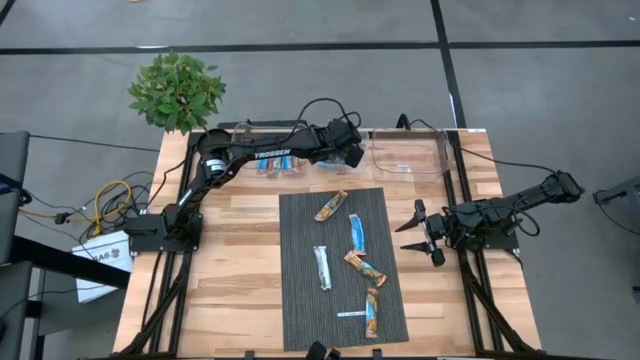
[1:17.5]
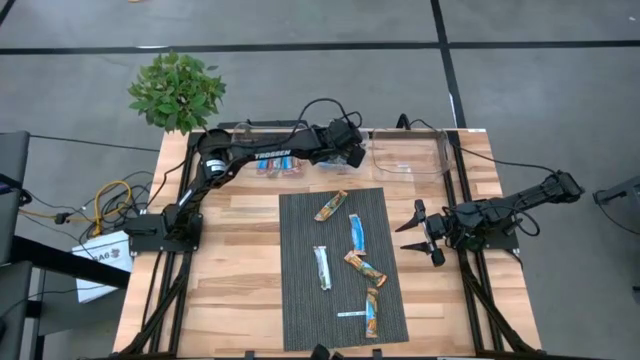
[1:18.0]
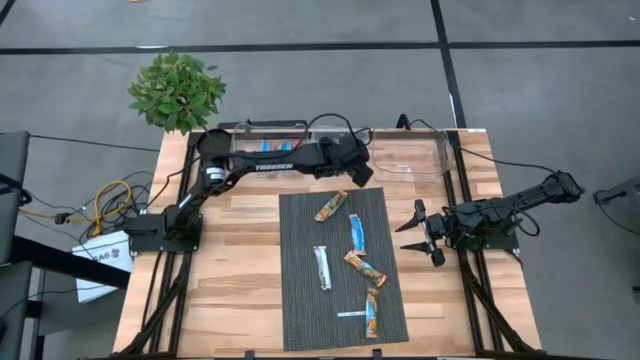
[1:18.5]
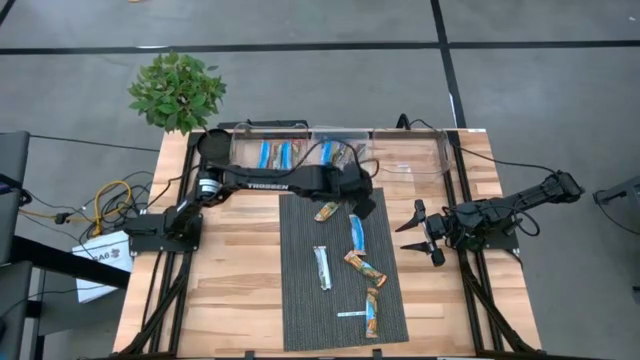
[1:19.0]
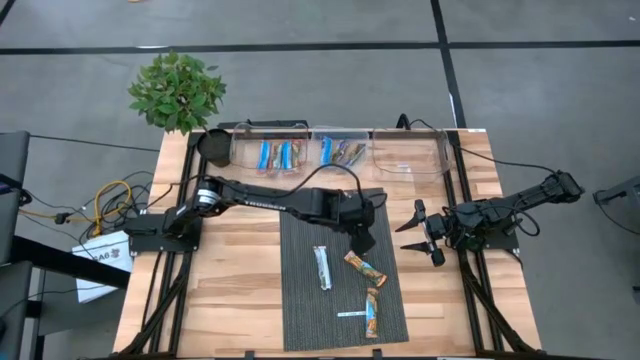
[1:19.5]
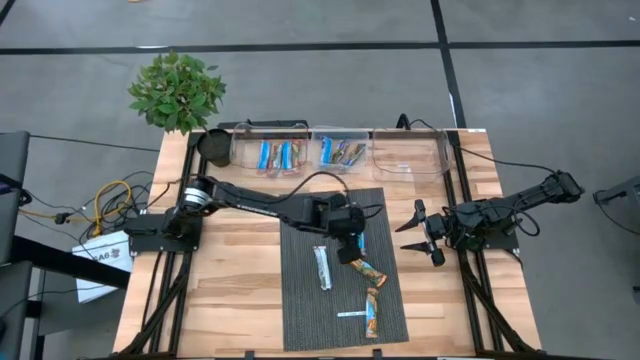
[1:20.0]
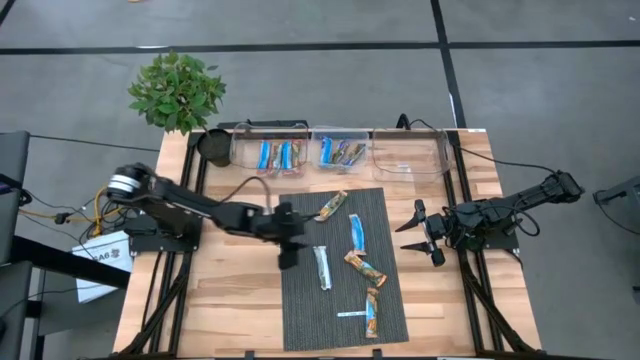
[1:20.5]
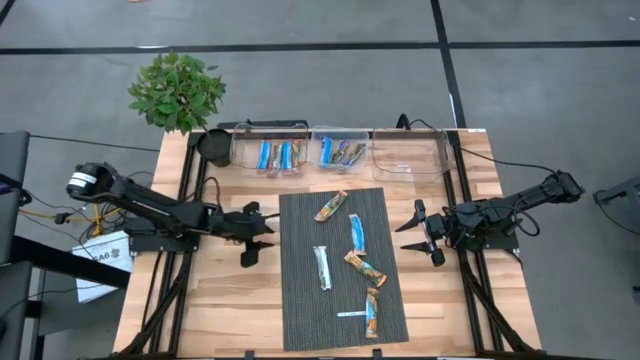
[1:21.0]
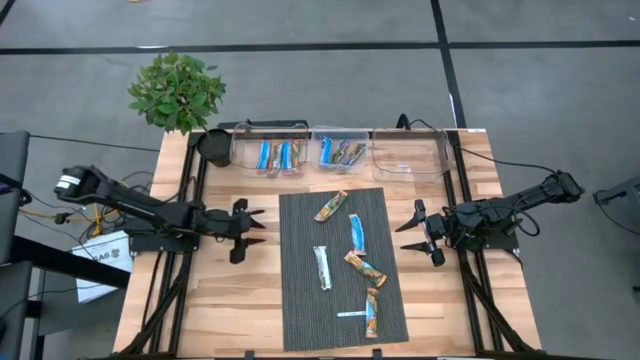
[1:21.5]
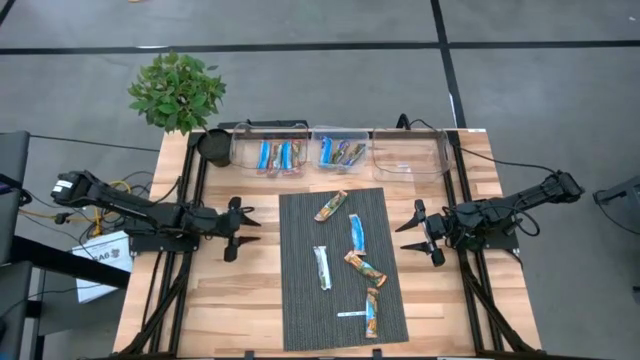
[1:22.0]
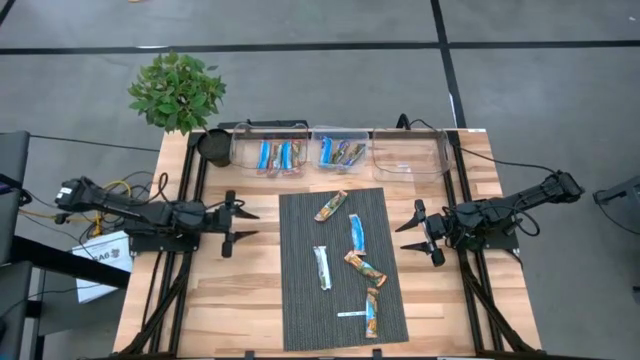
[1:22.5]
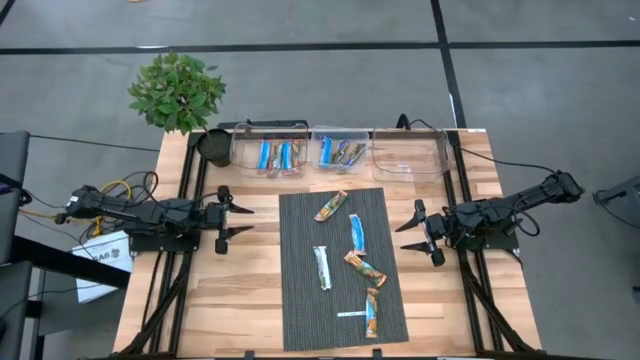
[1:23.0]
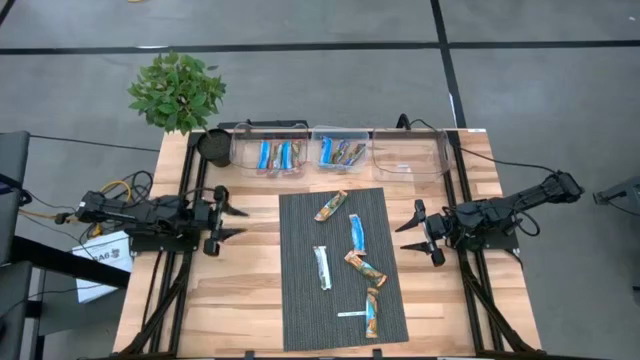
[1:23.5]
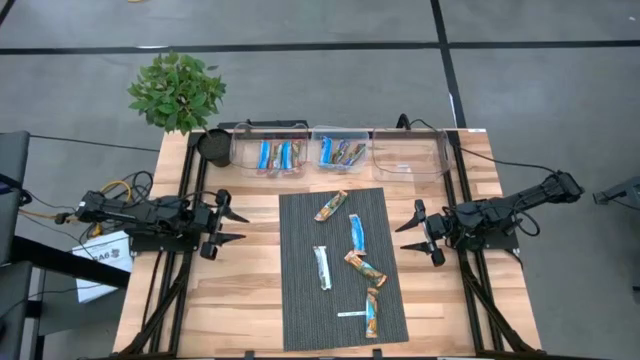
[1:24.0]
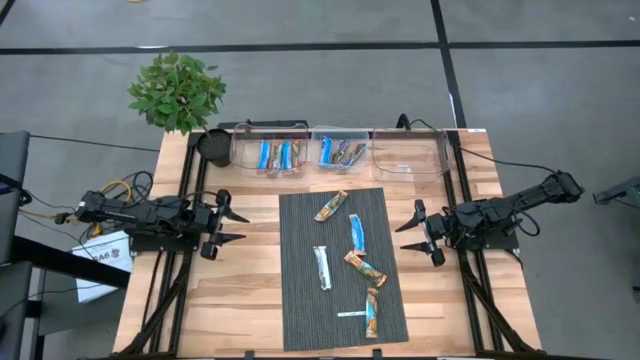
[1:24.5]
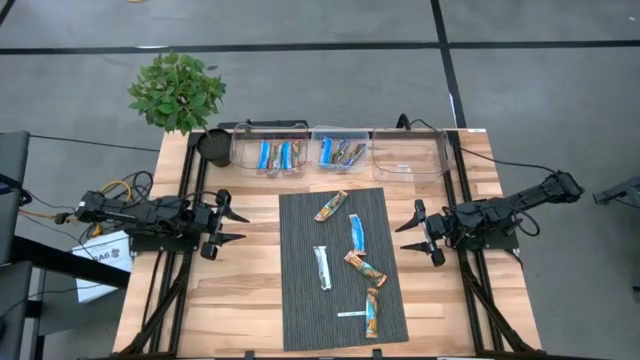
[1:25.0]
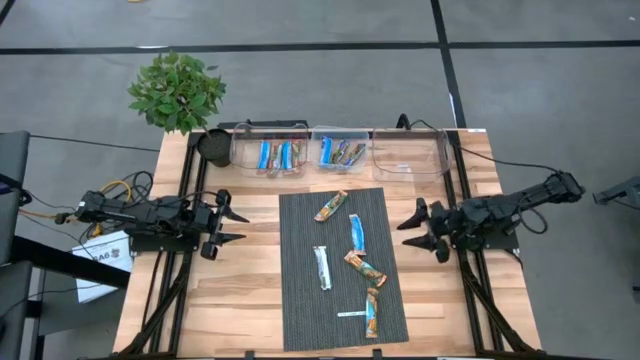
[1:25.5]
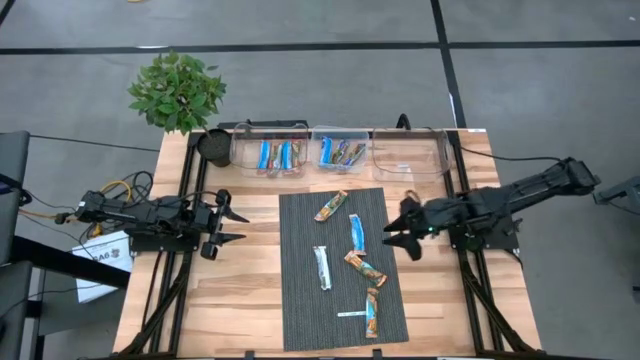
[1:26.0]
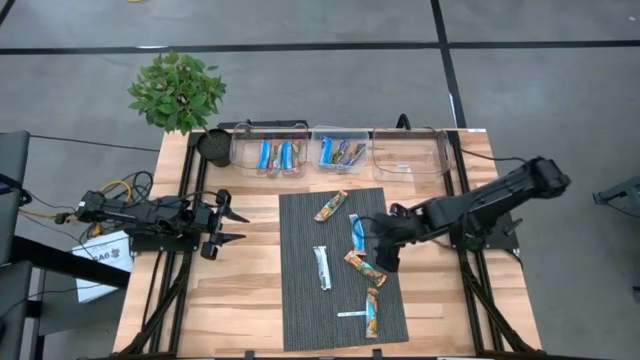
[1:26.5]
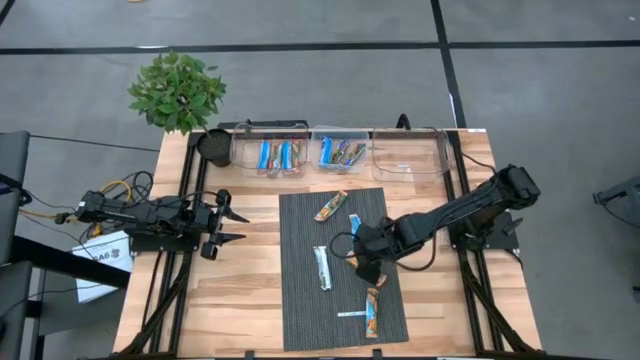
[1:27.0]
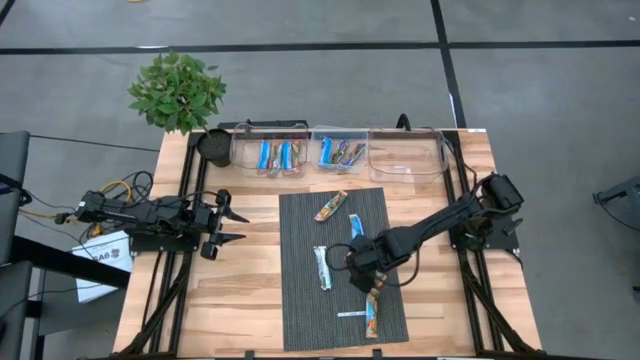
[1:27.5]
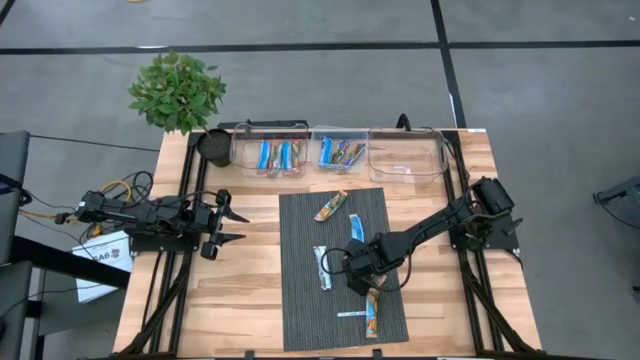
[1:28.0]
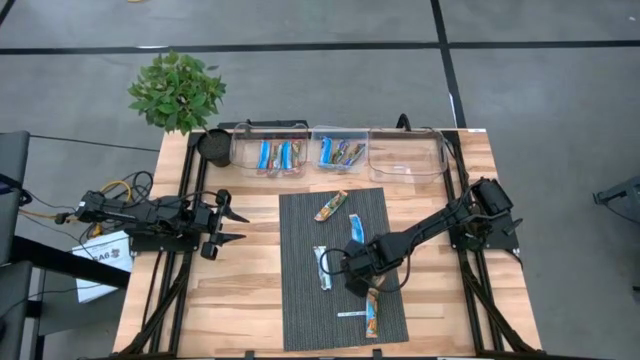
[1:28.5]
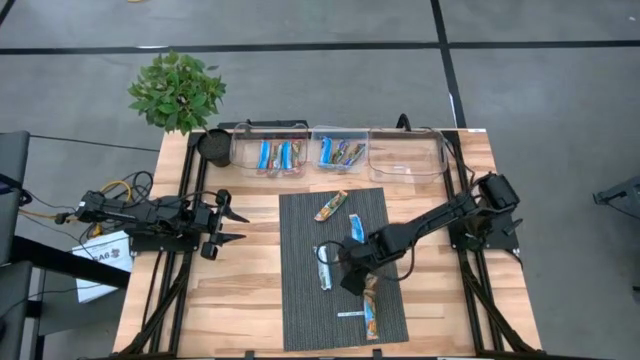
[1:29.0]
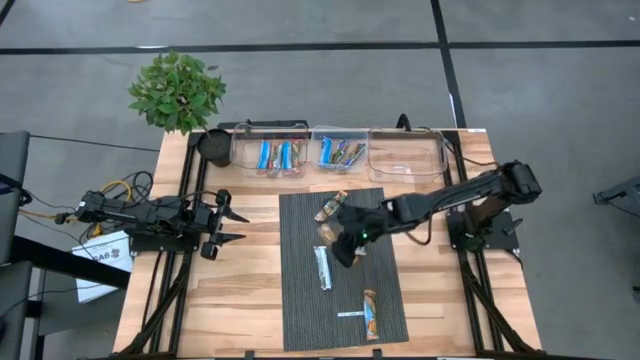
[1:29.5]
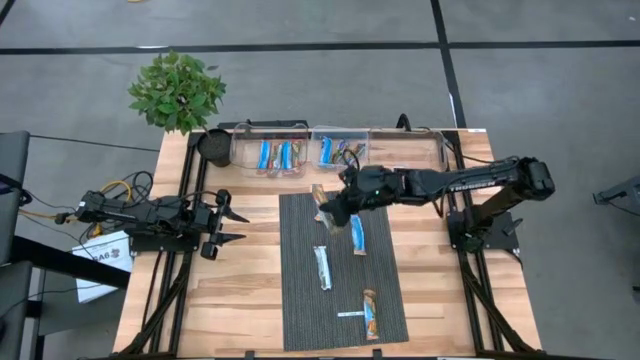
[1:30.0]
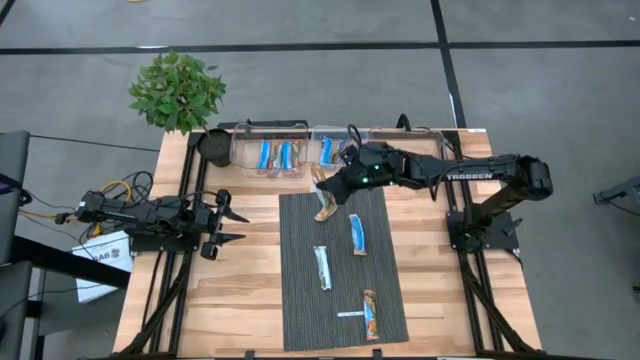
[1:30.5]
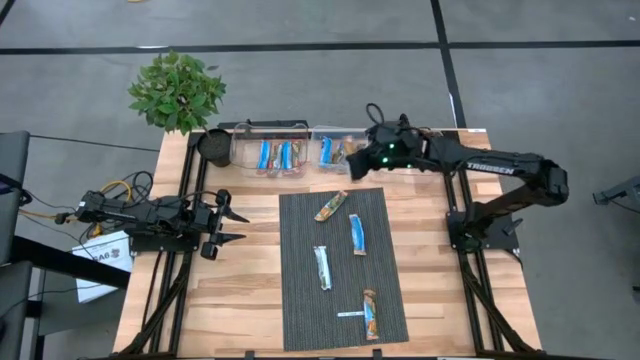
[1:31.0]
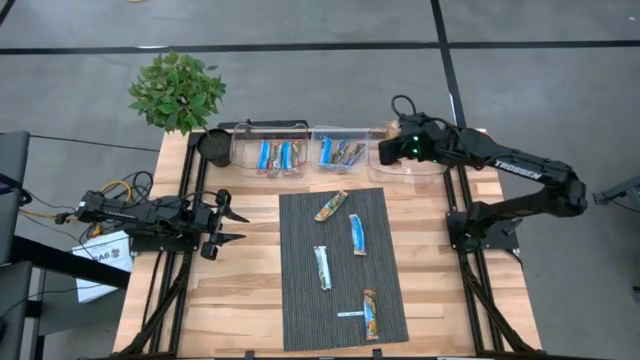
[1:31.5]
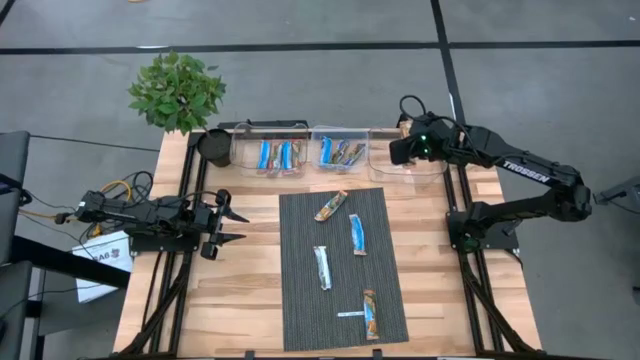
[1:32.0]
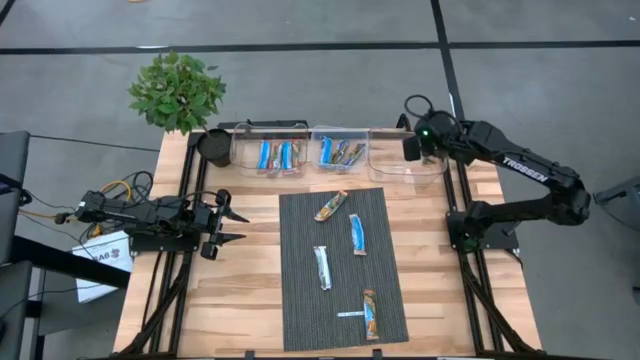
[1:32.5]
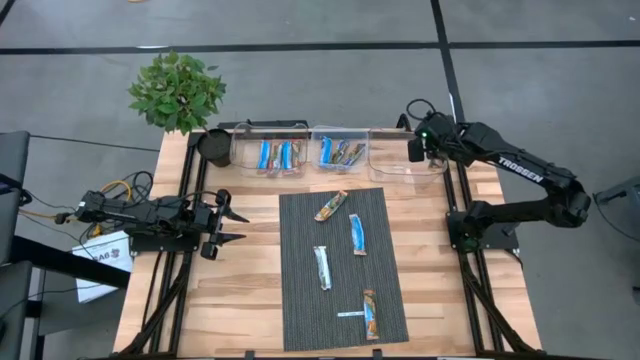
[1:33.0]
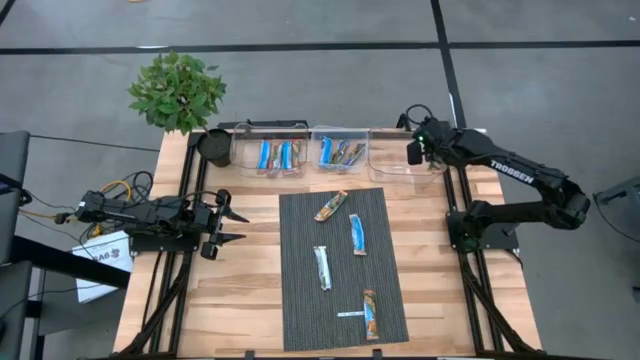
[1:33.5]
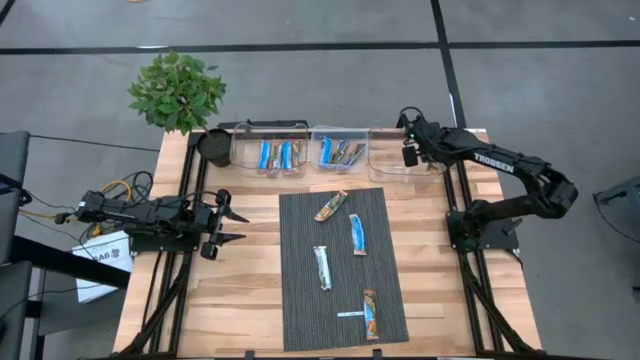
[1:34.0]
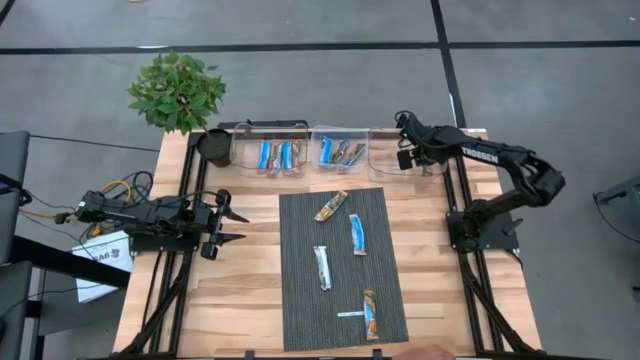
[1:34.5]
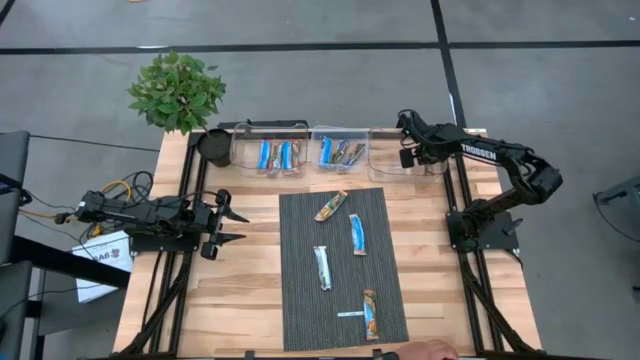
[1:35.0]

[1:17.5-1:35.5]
Task: Pick and place Granola Bars by type
Put the orange granola bar into the right transparent bin

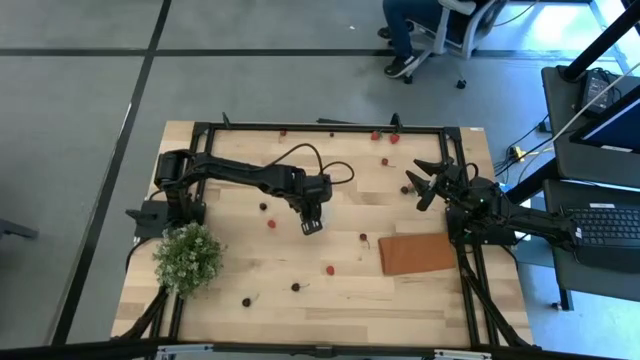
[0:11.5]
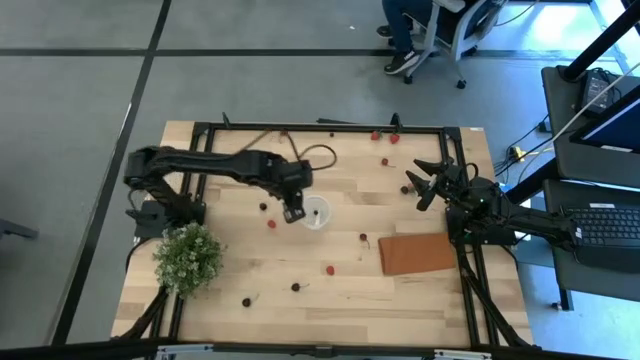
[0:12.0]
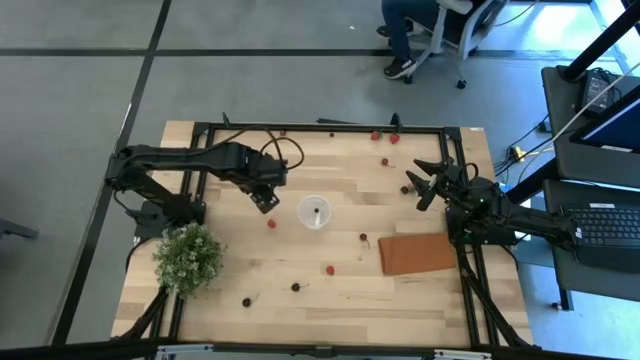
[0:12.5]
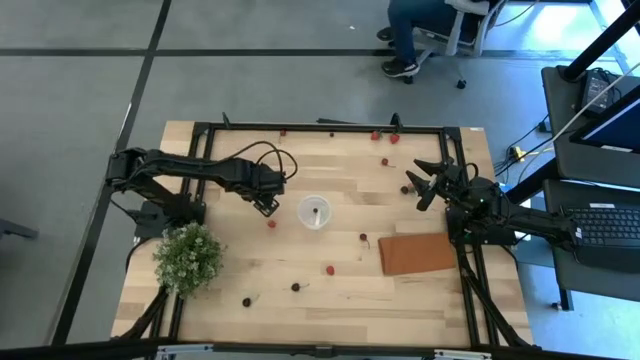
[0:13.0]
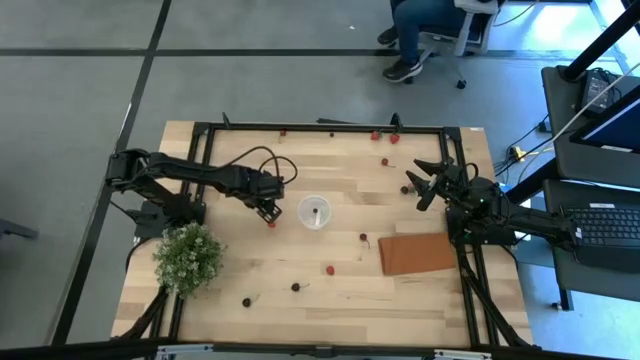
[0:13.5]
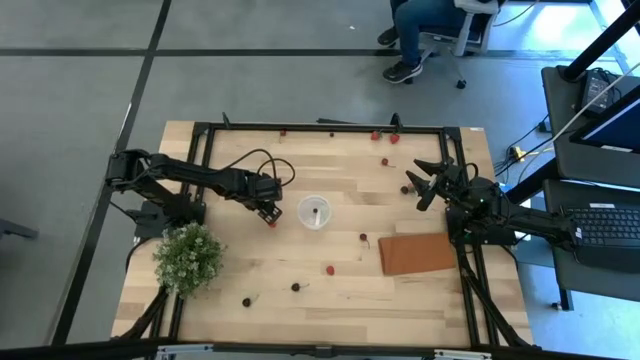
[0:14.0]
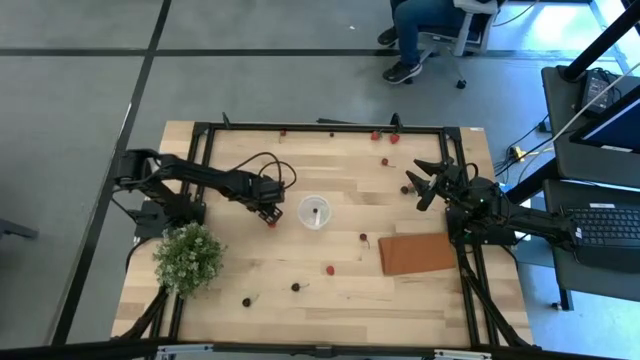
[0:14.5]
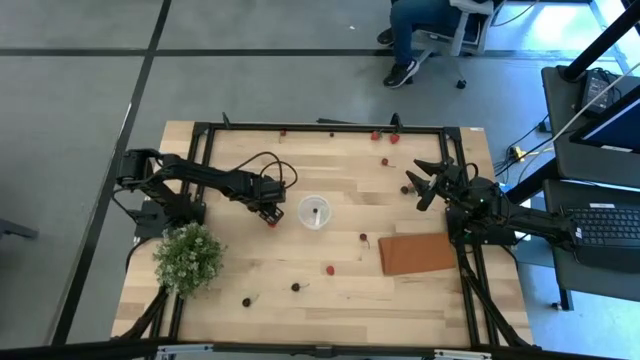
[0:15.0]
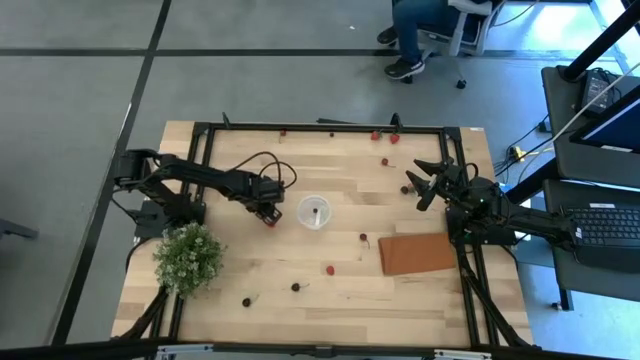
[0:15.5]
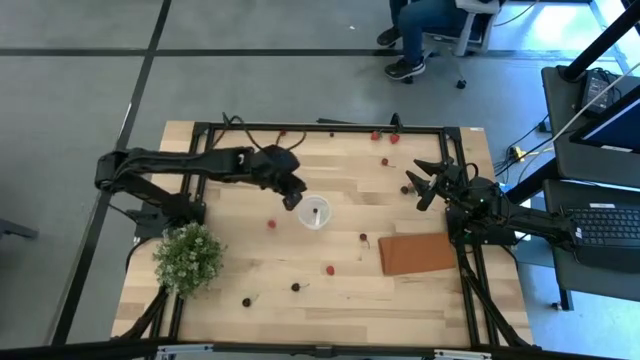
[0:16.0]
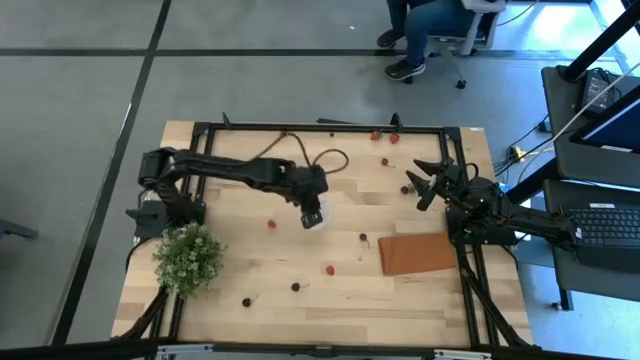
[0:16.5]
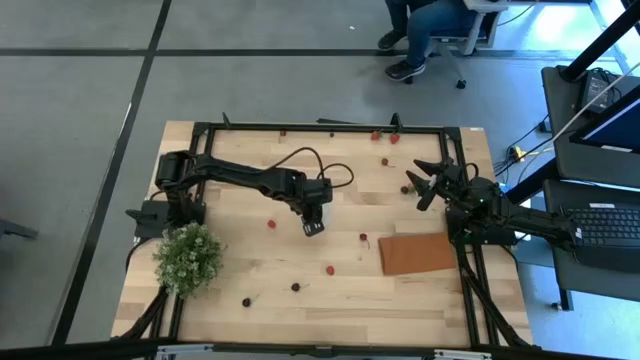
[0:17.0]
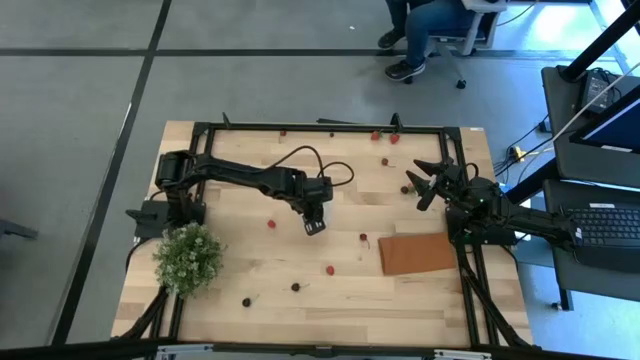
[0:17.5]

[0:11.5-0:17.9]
Task: Pick and placing Produce into tupperware
Put the left blackberry into the bin
